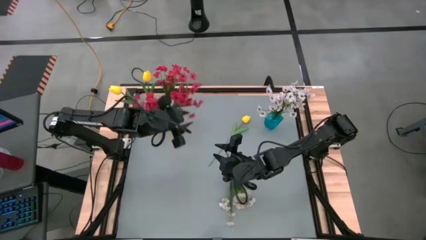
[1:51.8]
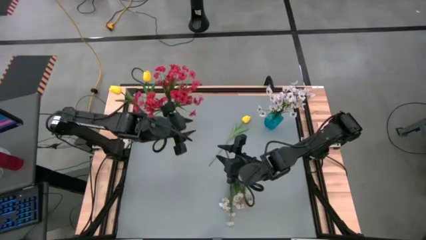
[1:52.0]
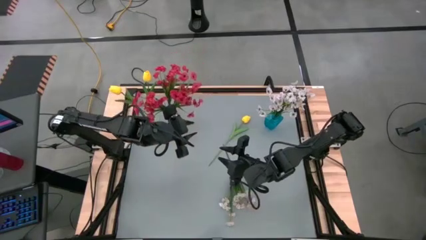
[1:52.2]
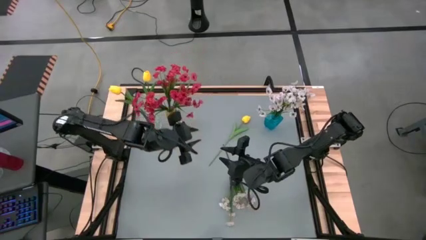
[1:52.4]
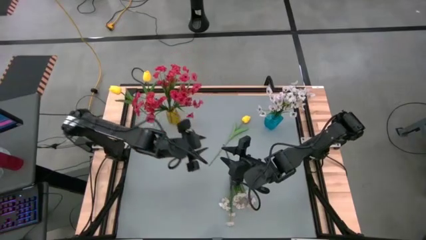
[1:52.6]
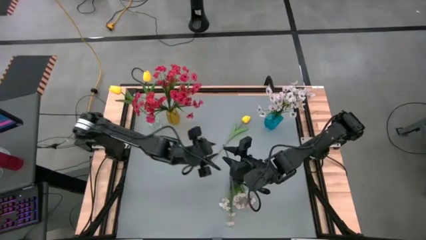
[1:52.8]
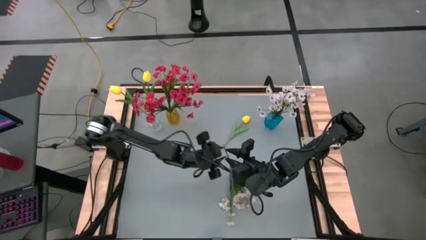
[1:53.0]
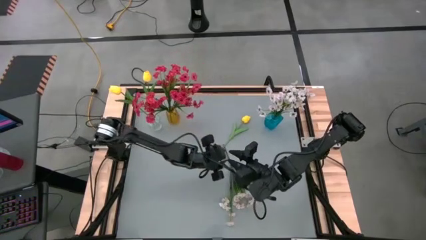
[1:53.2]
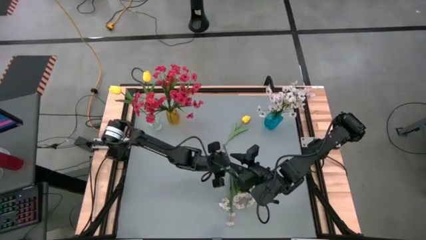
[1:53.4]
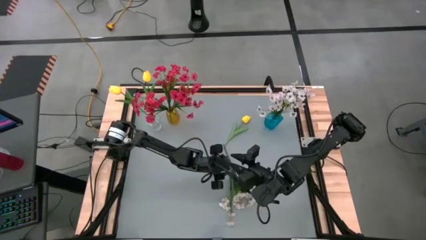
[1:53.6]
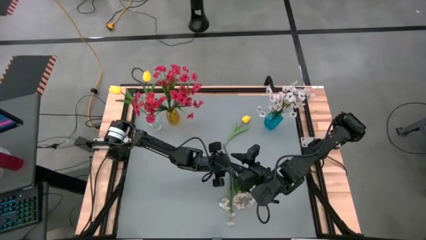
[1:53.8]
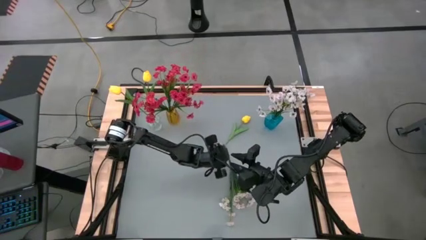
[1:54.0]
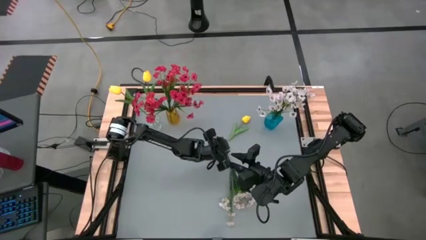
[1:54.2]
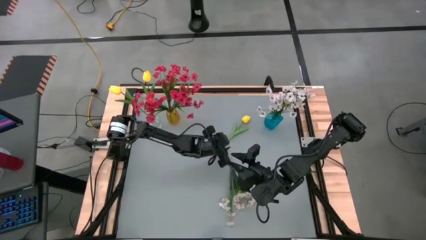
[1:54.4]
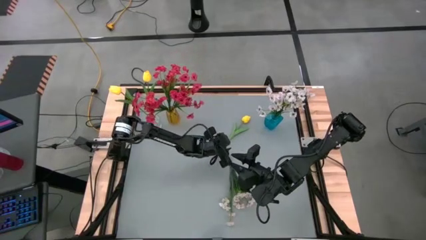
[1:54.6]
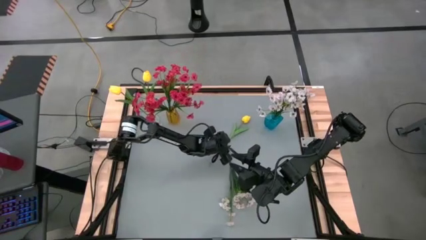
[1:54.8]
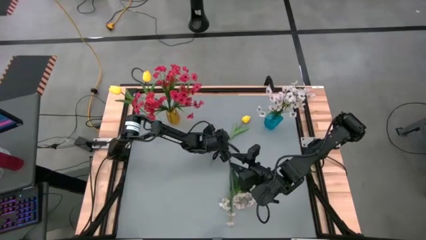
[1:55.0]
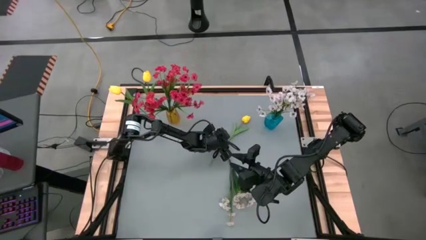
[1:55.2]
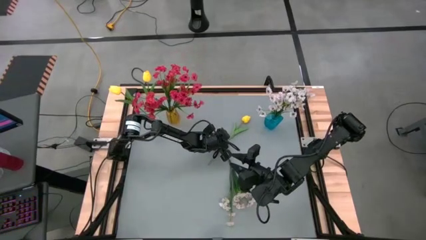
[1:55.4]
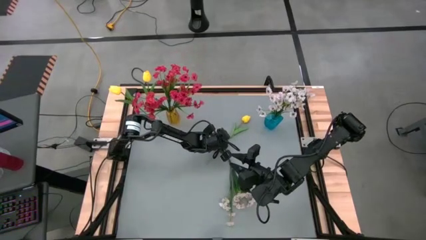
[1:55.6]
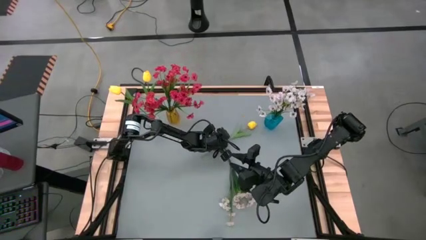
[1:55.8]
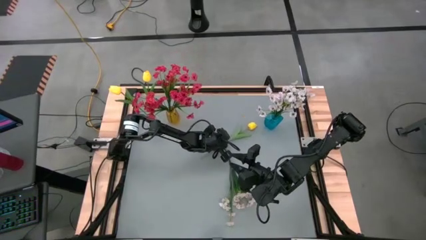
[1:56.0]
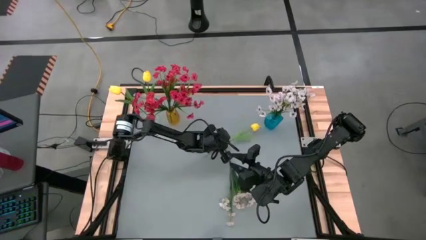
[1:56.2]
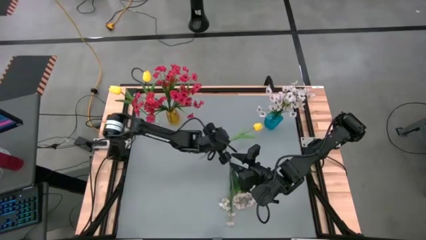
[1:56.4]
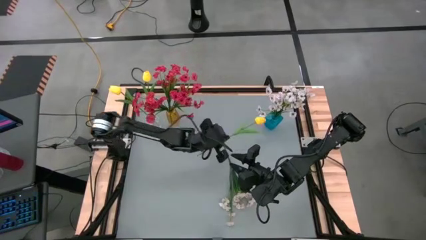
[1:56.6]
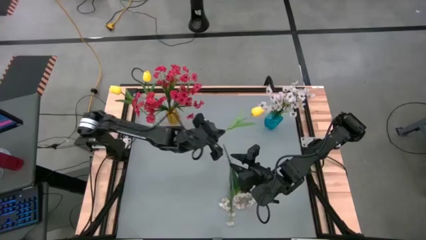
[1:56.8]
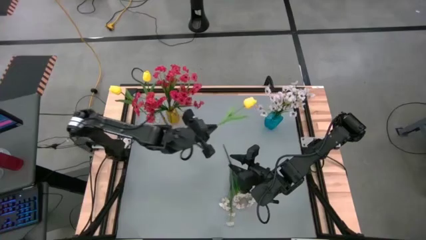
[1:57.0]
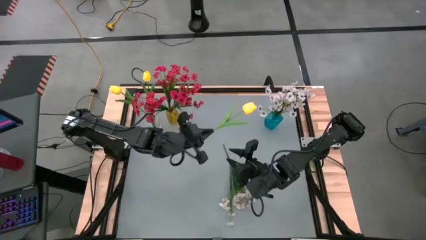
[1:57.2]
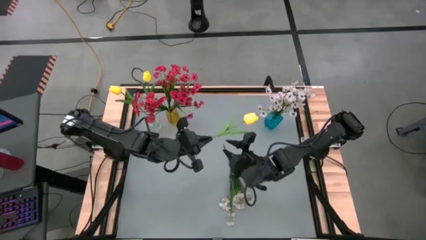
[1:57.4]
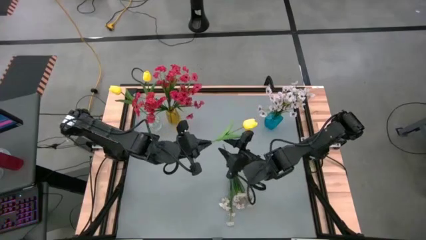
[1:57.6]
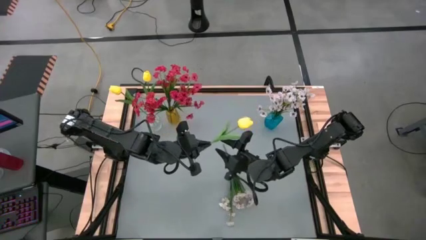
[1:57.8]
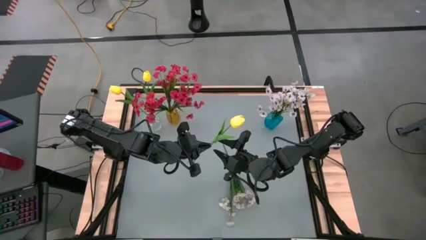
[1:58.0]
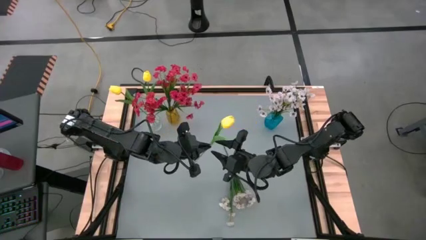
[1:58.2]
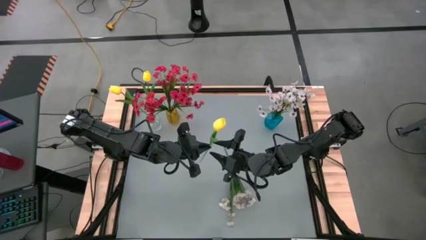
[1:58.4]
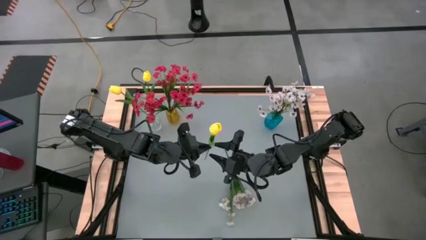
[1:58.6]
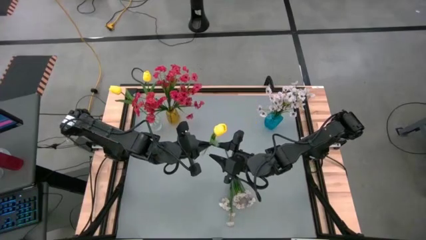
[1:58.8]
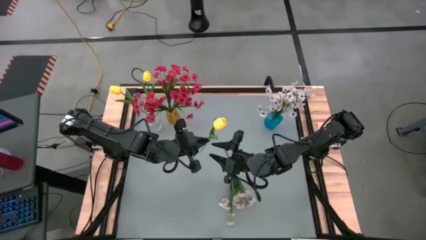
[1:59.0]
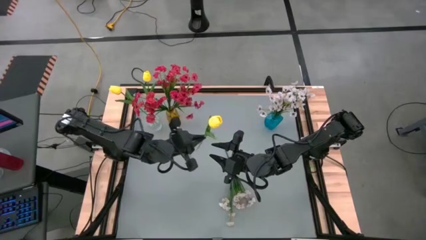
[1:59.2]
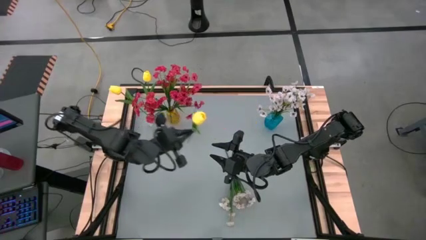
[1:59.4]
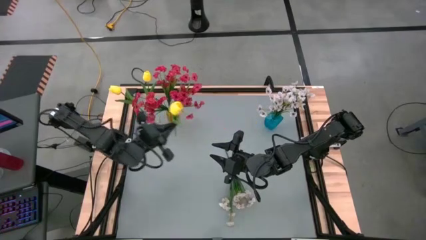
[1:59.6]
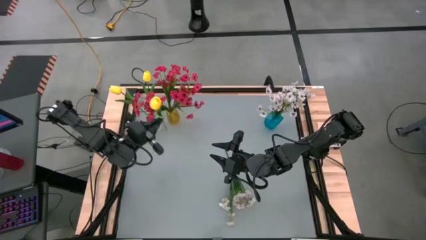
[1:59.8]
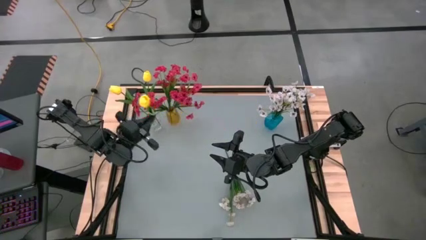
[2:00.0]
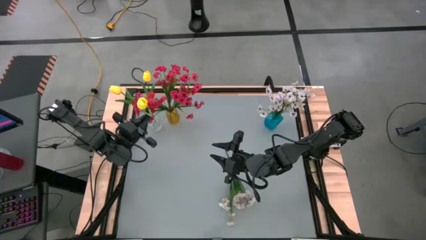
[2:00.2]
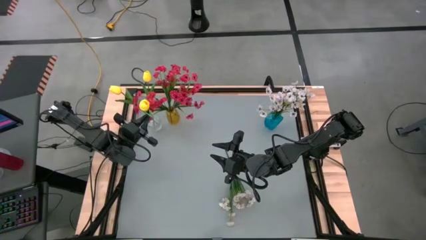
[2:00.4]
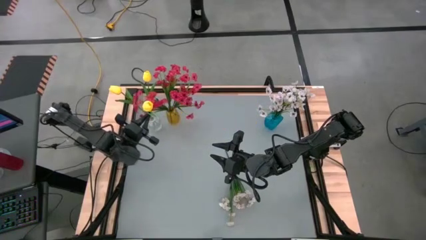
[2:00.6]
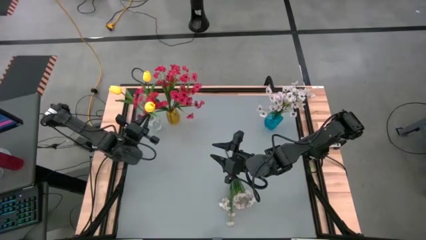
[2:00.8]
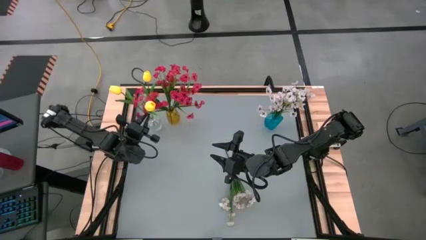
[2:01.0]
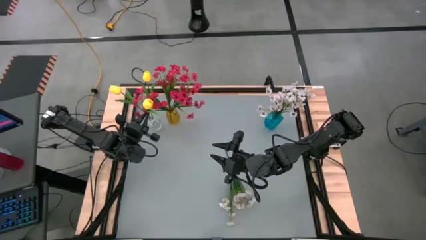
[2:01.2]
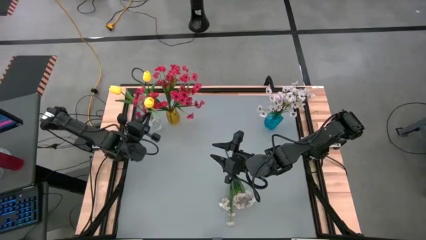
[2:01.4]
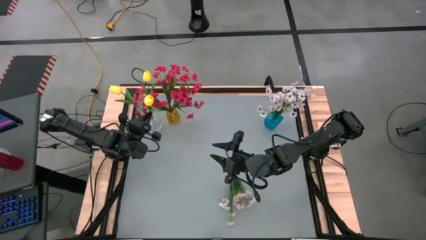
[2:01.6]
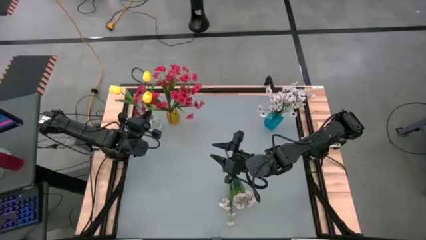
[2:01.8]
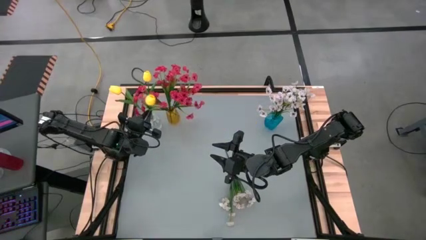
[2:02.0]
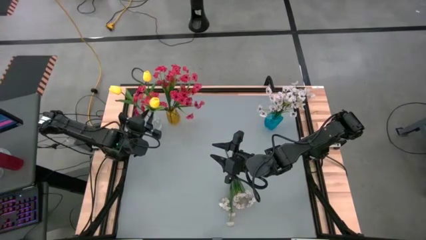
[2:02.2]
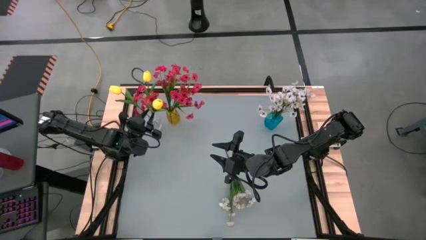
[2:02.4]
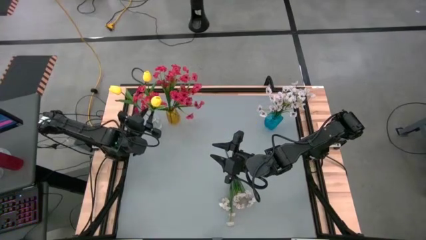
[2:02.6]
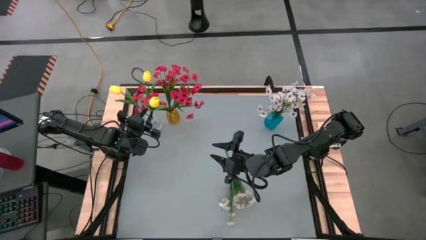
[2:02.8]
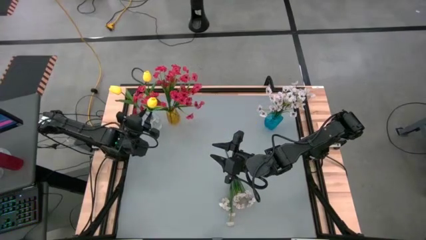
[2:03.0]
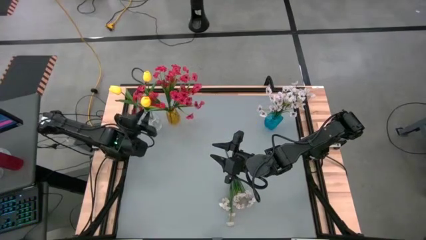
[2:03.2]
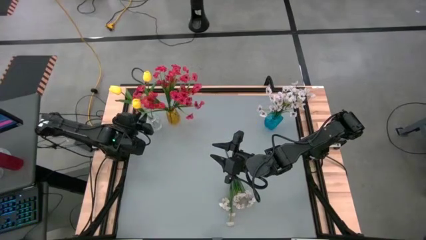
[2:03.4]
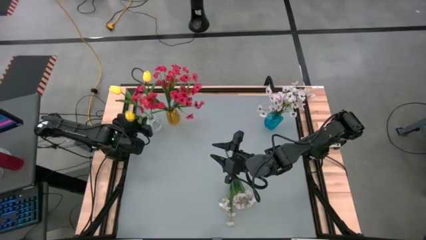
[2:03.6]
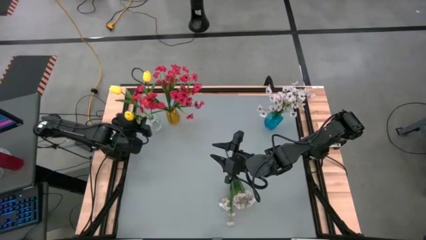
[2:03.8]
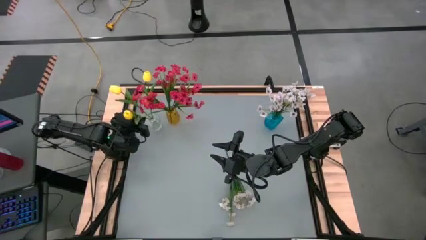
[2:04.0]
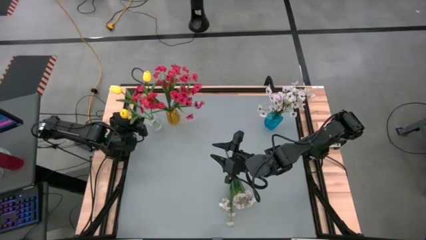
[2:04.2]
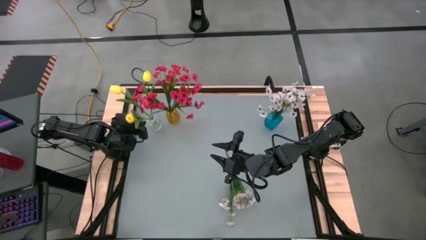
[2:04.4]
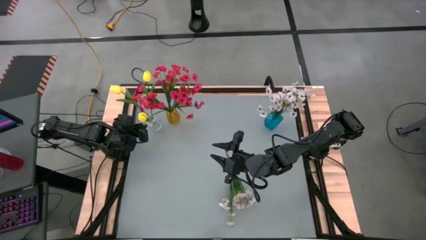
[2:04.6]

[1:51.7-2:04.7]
Task: Sort flowers into vase by color
Put the yellow tulip into the transparent vase

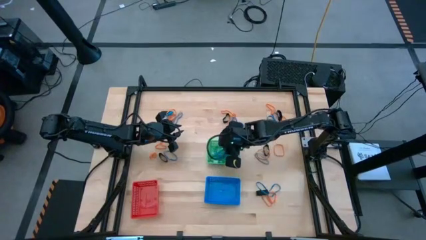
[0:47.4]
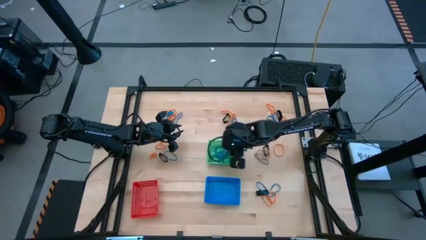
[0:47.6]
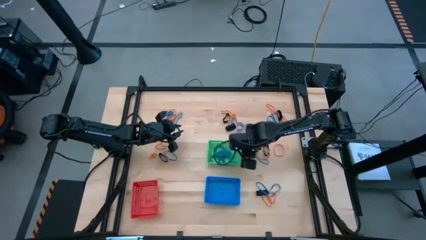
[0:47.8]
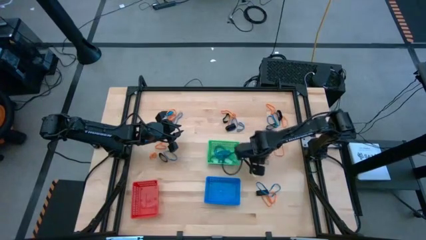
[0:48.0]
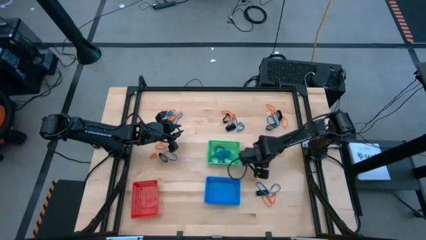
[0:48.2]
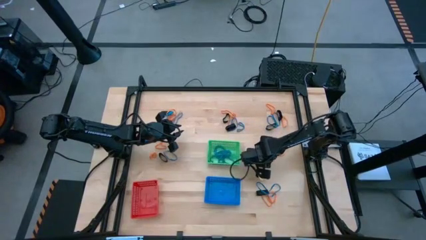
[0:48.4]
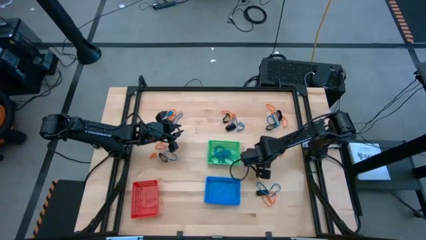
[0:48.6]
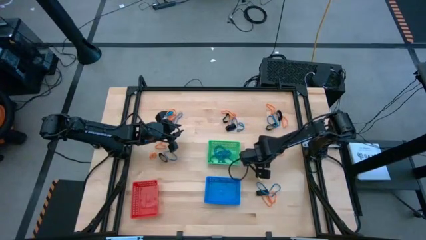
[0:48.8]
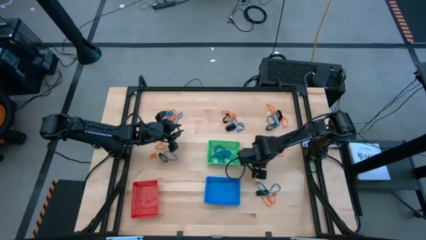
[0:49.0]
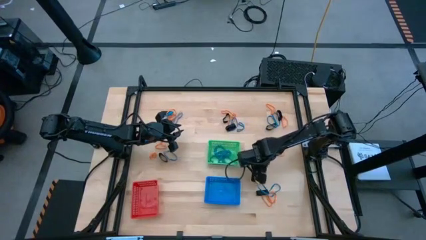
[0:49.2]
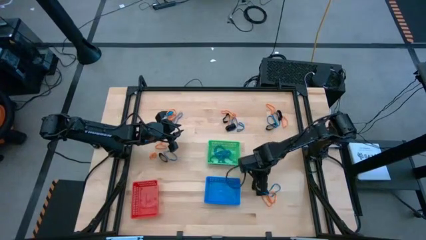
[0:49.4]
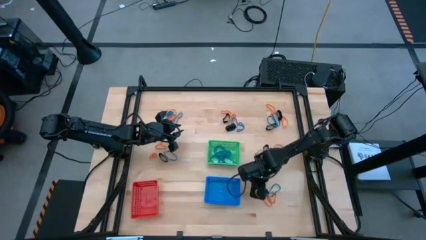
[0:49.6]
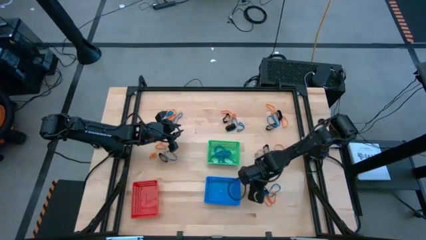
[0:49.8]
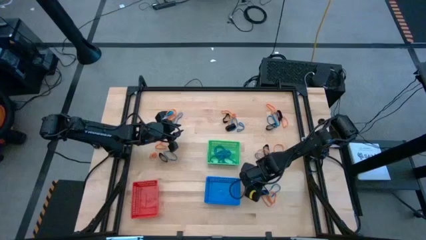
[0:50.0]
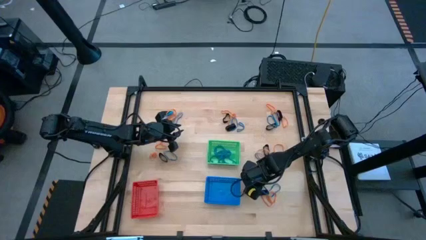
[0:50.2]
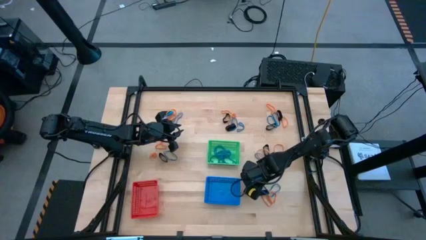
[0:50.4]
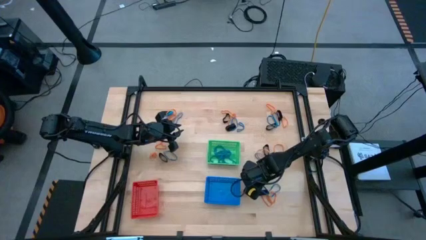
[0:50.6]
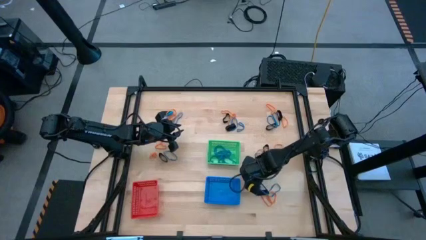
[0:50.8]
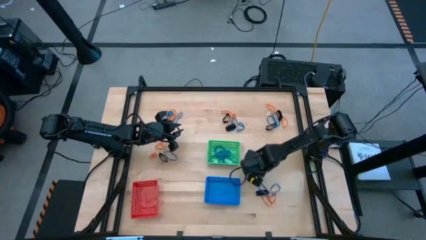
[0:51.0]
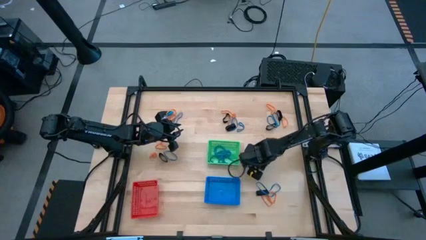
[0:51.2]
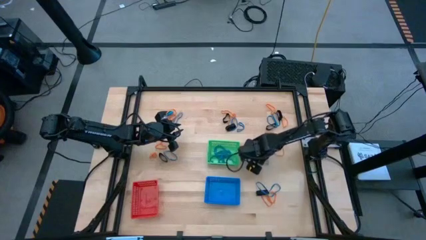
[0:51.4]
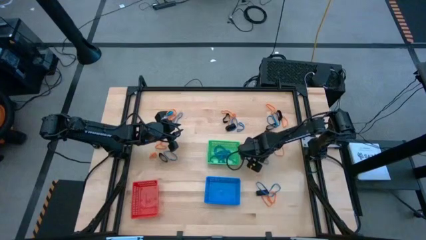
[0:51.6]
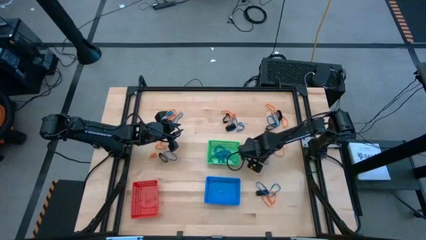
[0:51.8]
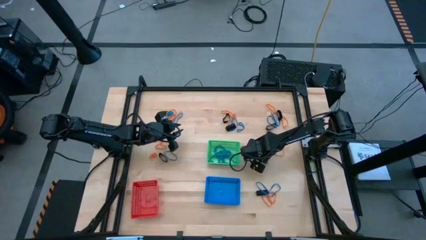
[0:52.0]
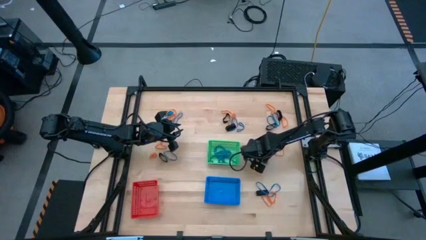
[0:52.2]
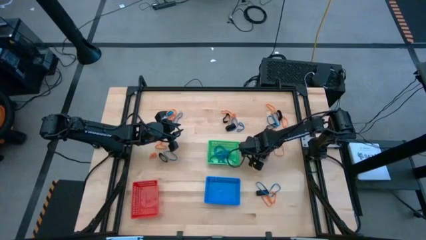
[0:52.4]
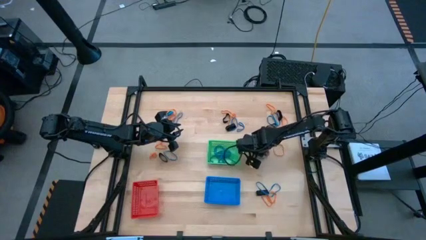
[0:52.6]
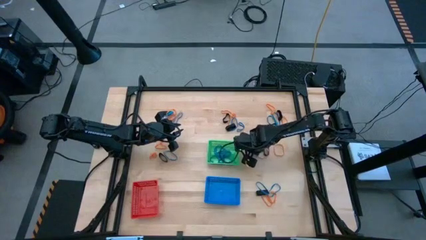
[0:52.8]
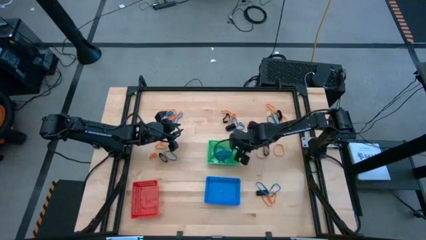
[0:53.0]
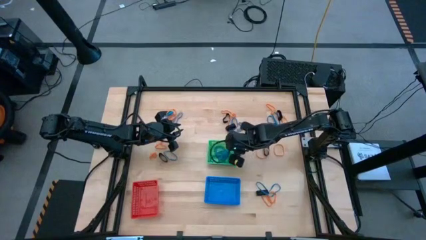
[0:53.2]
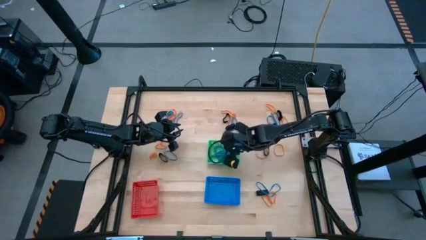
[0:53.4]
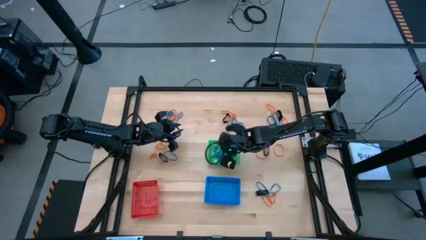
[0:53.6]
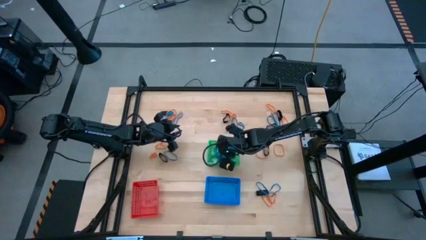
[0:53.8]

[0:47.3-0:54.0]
Task: Sort rubber bands into baskets
Put the blue rubberband into the green bin
